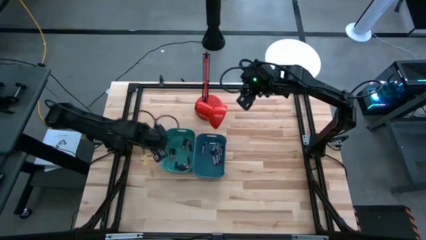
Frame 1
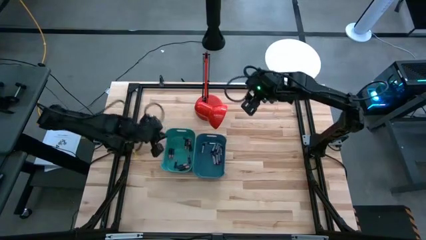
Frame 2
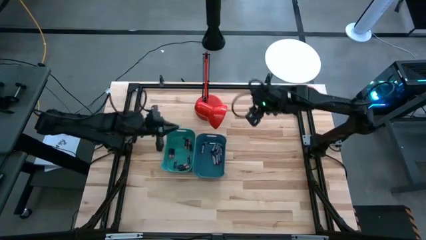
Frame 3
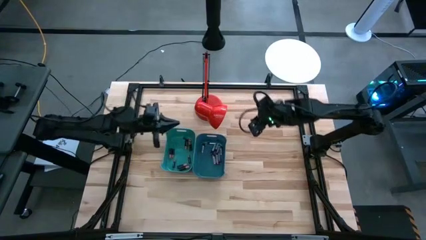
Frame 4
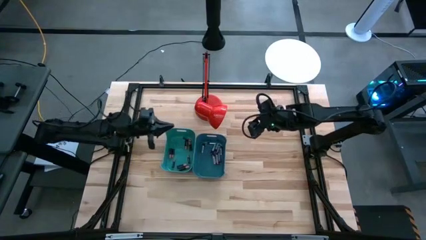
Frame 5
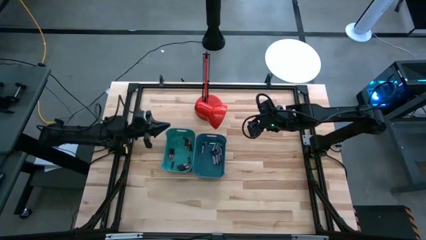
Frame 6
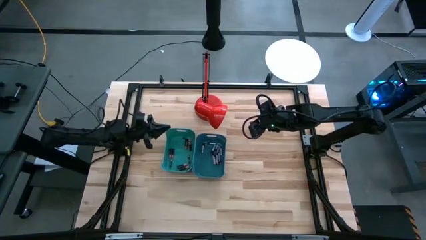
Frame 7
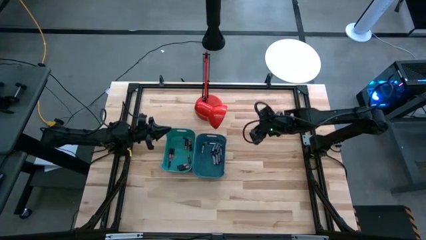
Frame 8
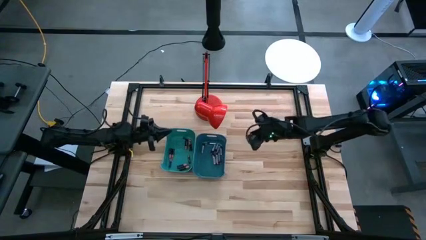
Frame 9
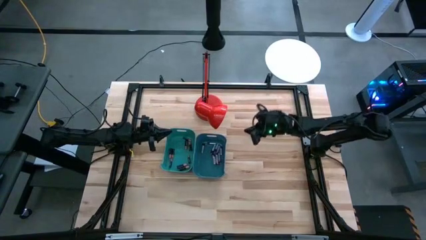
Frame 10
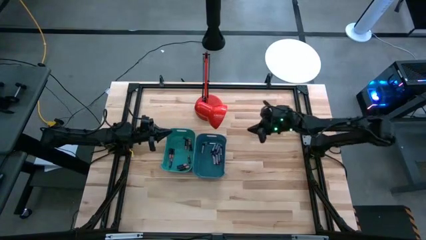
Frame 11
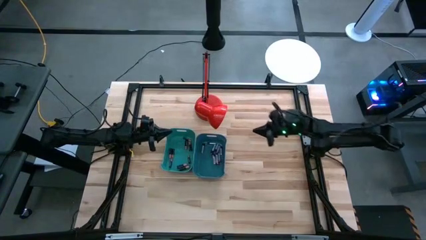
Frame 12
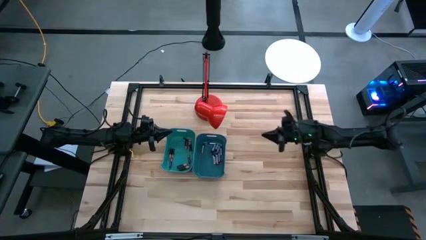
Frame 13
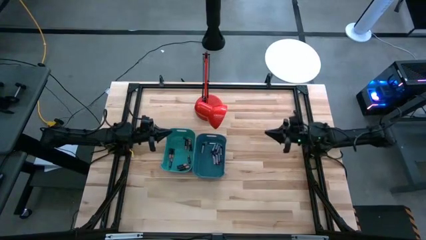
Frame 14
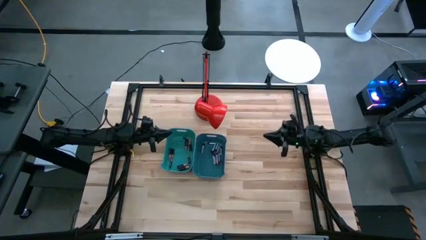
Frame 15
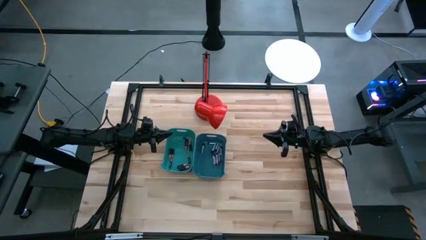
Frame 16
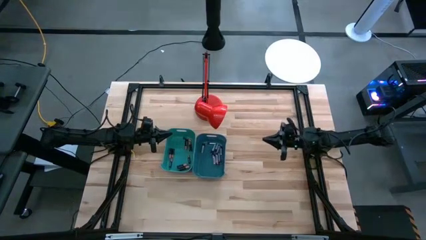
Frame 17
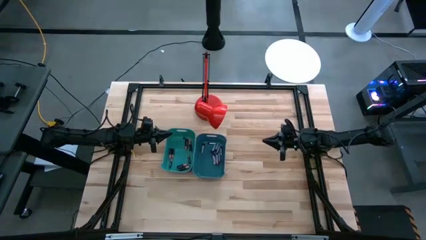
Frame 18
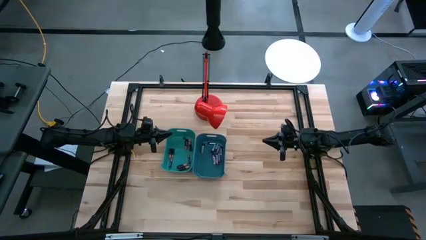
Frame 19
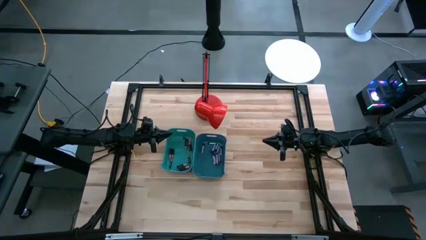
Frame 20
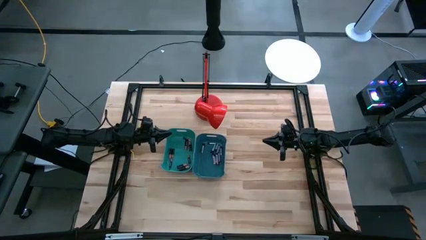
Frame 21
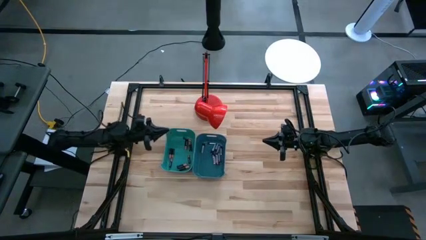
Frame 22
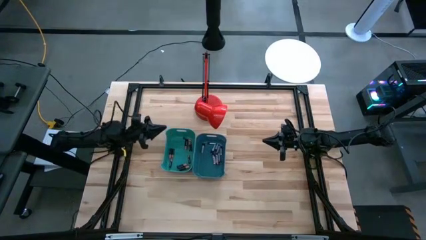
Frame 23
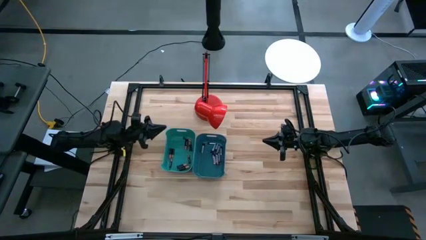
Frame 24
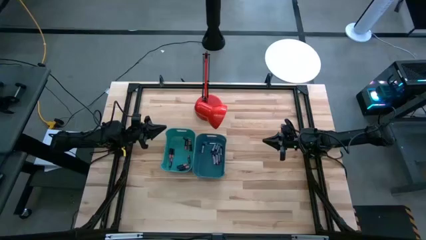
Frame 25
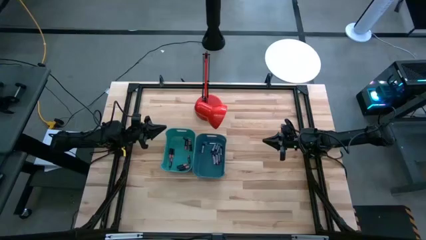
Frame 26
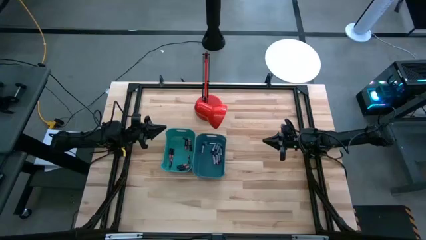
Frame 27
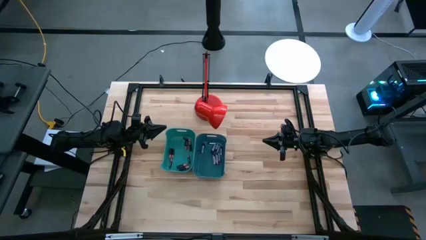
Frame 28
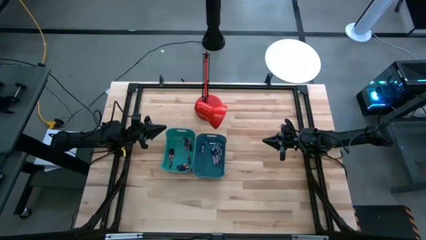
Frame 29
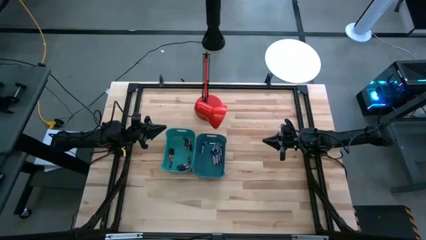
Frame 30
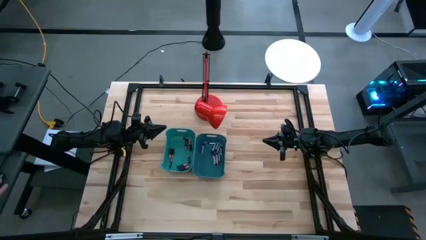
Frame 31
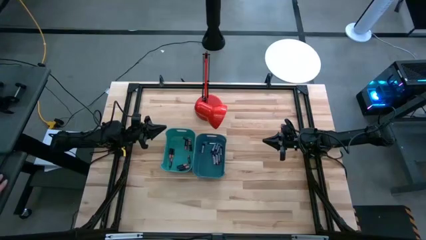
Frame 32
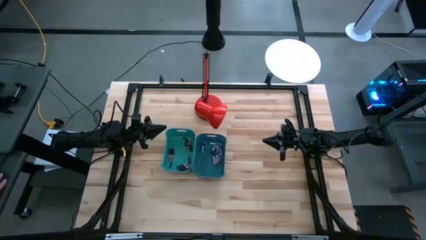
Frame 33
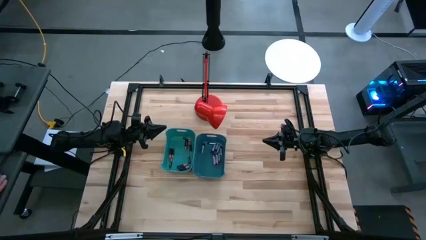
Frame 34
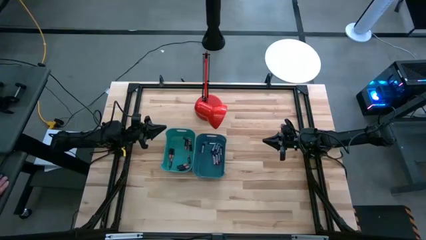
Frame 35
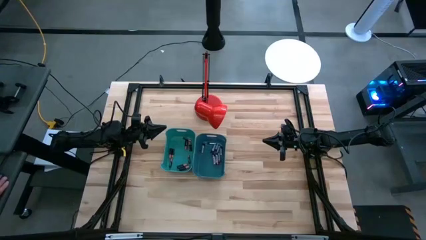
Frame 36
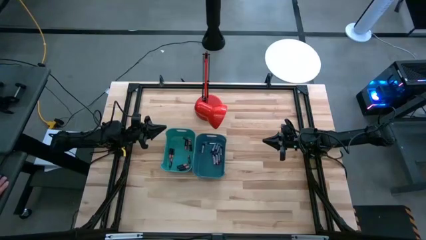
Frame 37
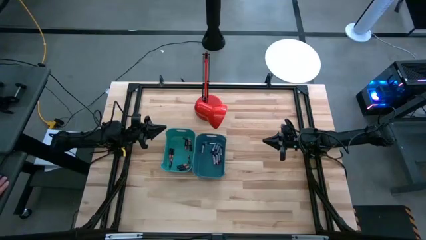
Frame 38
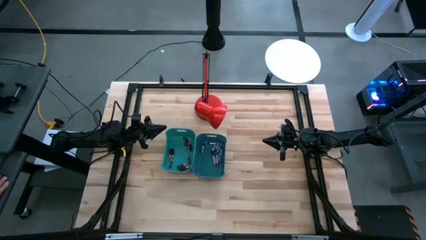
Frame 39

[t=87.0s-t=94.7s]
Task: Sort batteries
Return to Home Position

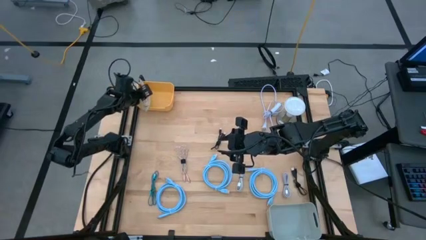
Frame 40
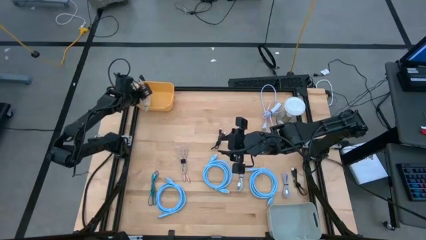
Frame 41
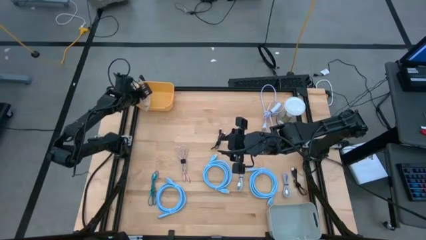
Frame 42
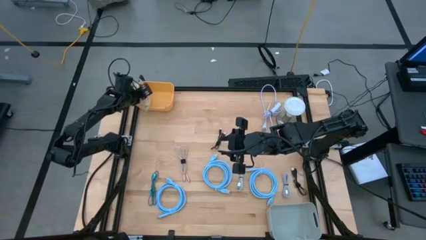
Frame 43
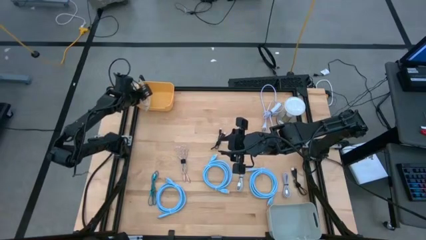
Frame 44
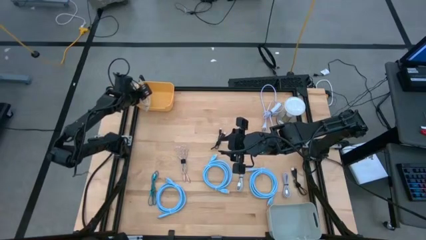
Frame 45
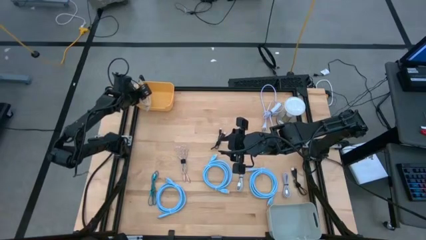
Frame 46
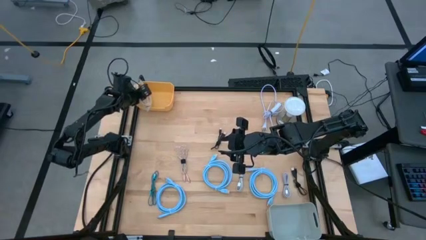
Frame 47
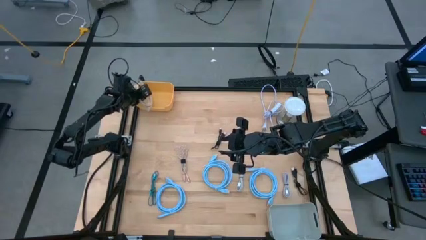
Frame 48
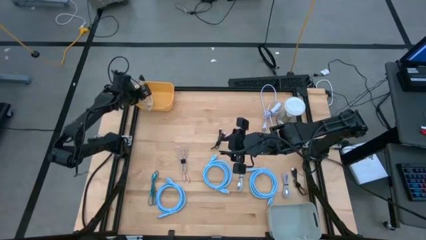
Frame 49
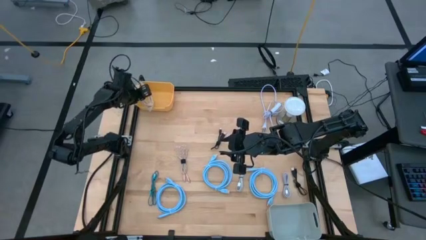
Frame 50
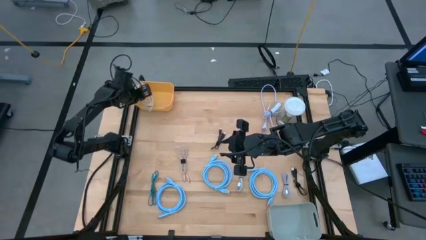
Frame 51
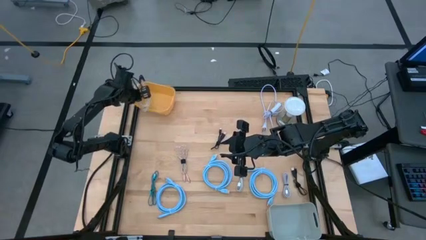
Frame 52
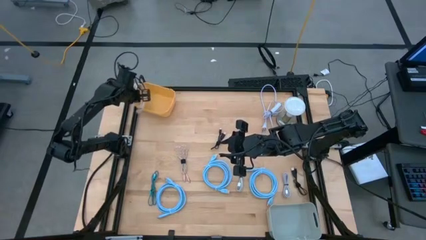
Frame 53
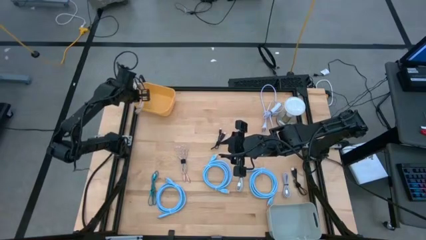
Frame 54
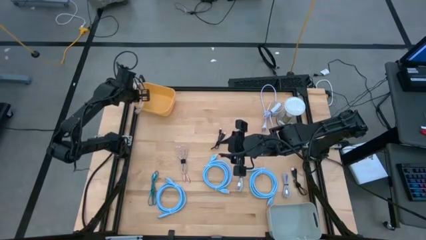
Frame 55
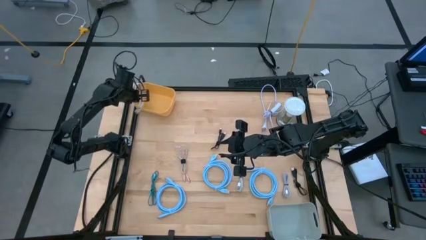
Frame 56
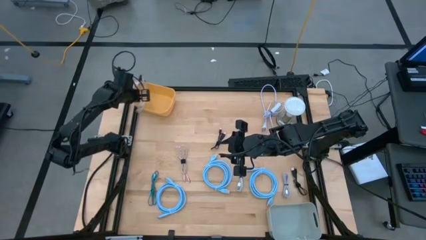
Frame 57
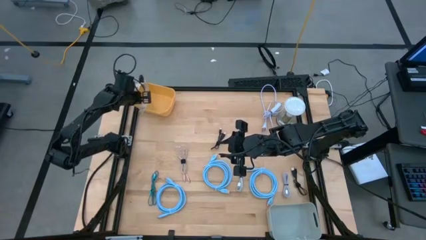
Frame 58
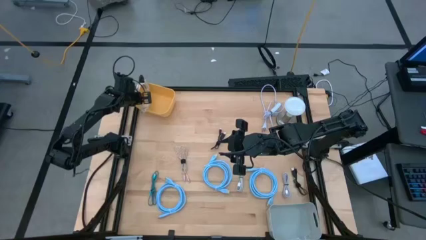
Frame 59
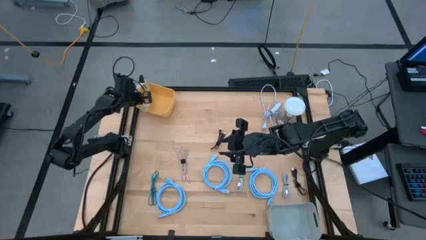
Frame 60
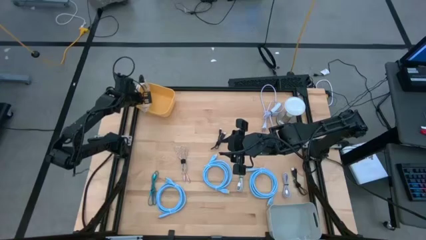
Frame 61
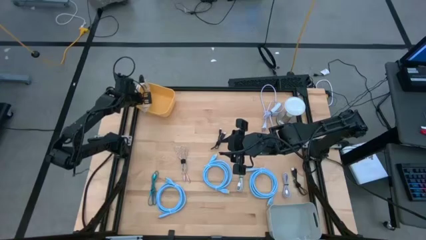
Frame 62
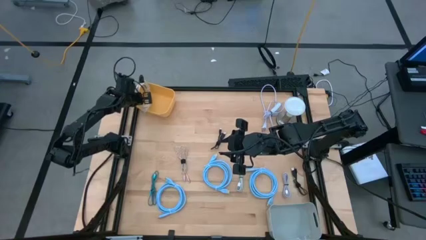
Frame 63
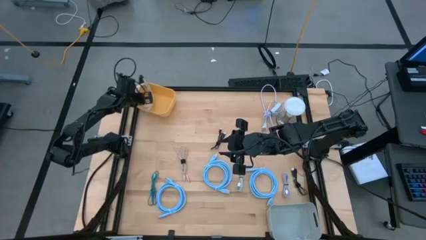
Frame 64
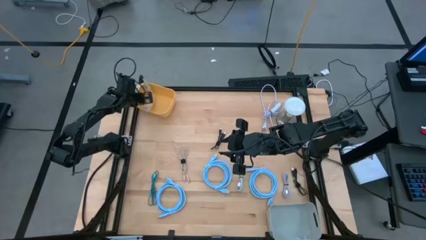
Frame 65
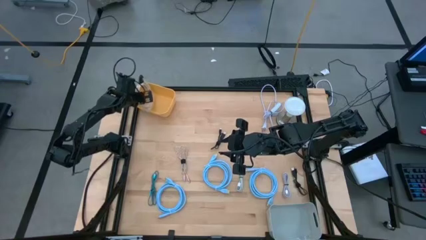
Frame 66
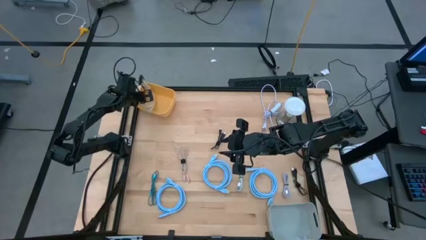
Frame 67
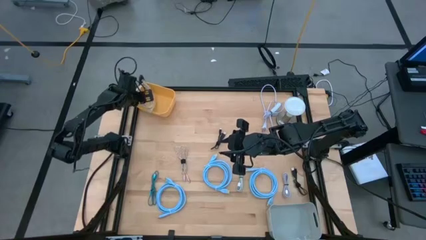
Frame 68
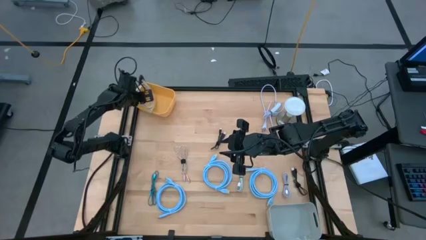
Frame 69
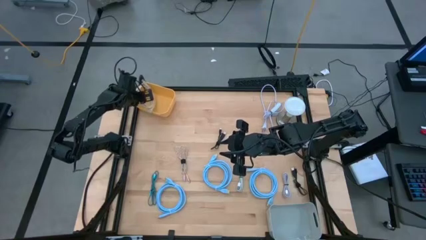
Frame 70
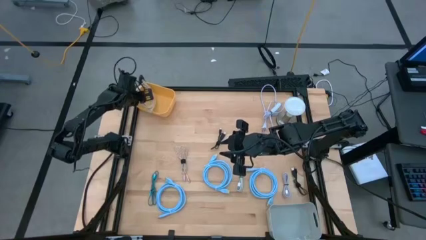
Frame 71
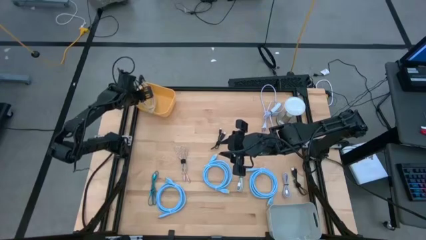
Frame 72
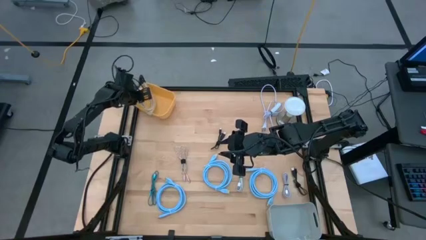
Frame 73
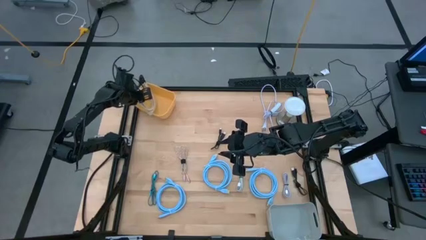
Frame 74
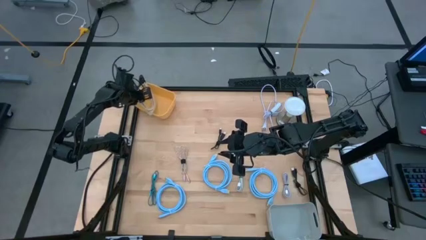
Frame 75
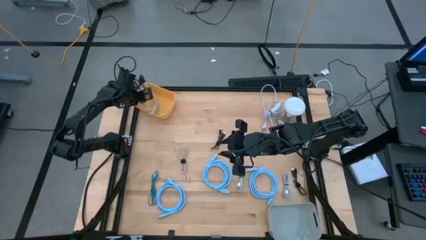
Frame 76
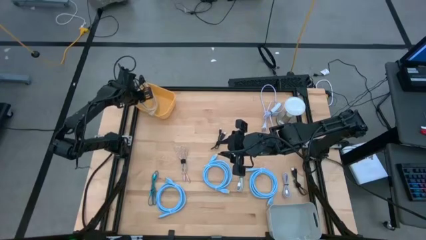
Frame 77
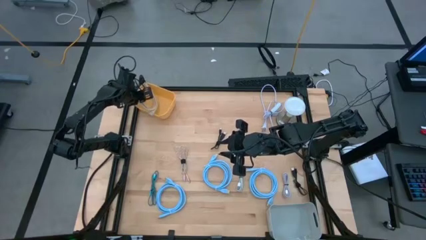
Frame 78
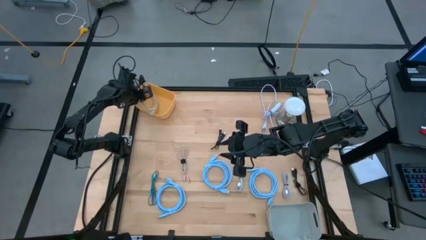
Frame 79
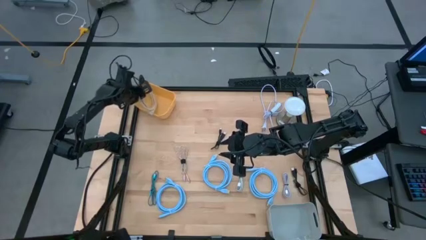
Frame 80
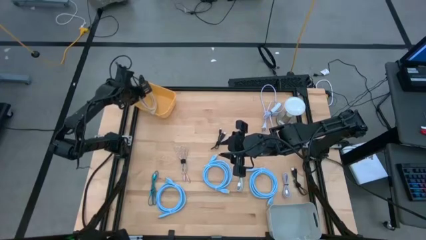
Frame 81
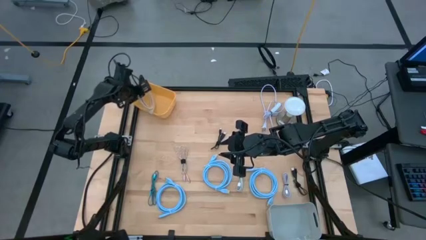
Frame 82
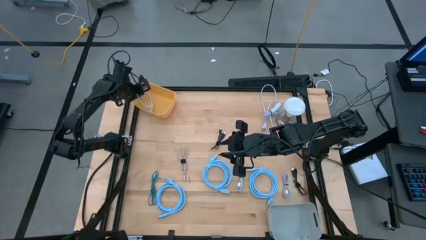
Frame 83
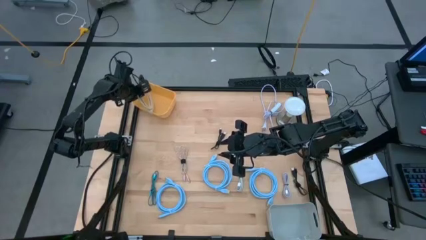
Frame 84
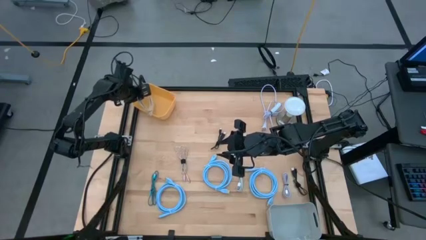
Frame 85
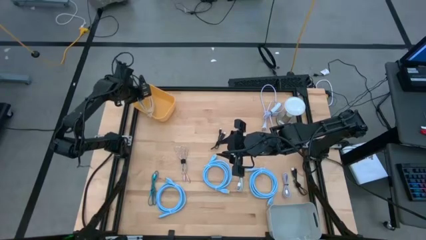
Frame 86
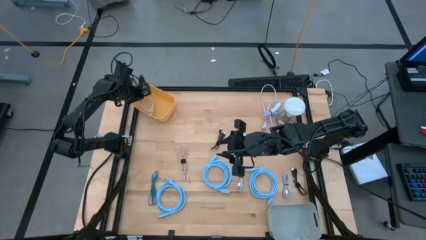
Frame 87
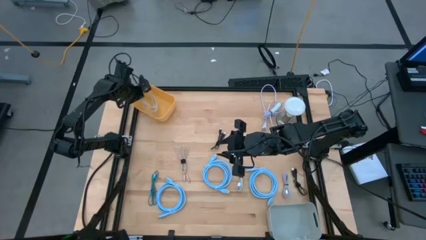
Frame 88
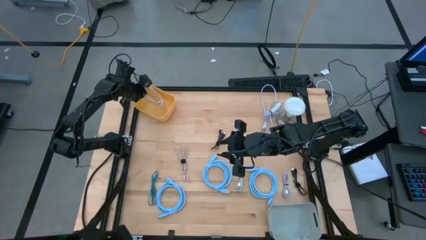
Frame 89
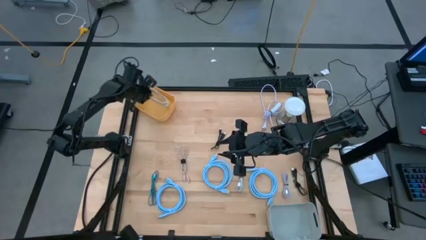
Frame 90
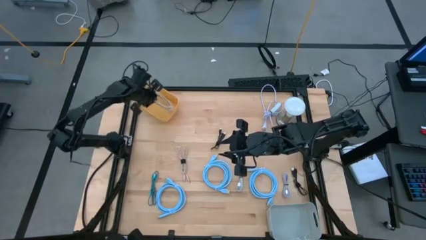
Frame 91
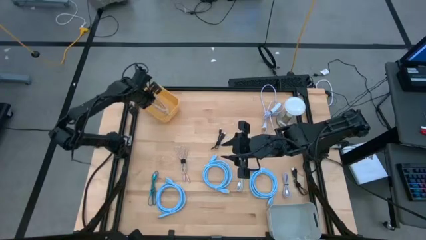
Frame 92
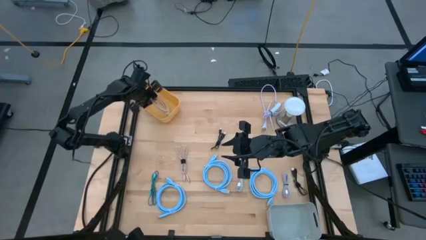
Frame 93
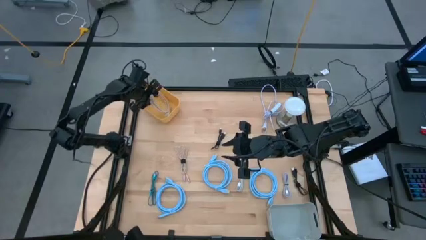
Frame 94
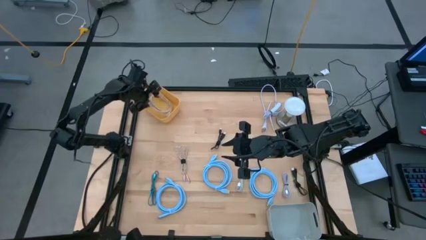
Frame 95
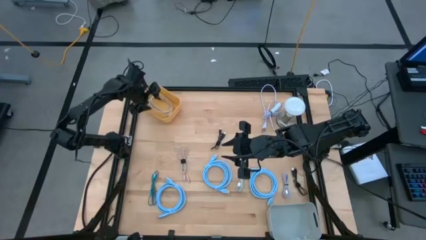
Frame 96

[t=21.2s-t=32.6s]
Task: Pick & Place USB Port
Put the gray hdmi cable into the yellow bin
